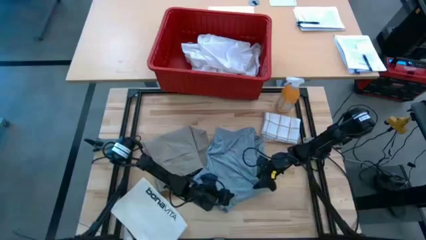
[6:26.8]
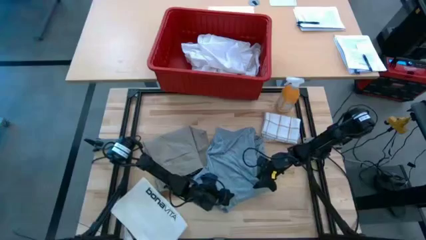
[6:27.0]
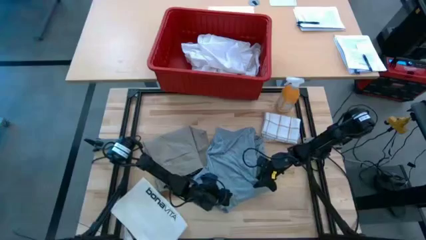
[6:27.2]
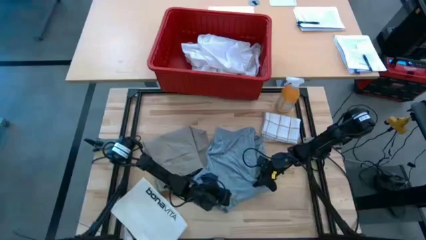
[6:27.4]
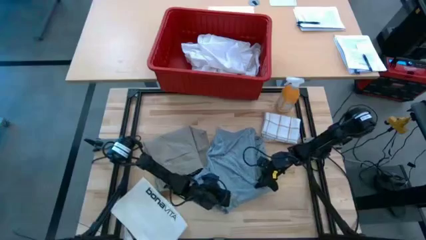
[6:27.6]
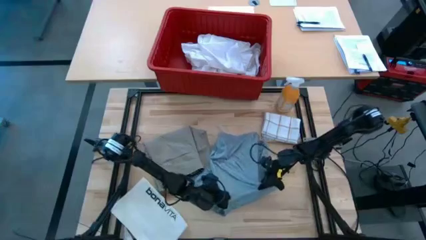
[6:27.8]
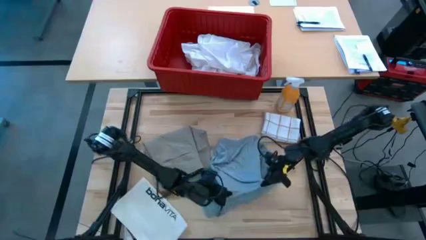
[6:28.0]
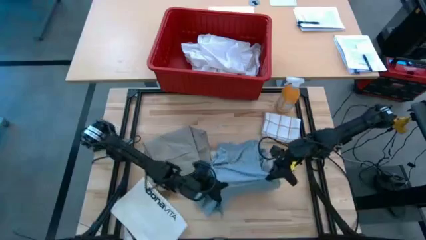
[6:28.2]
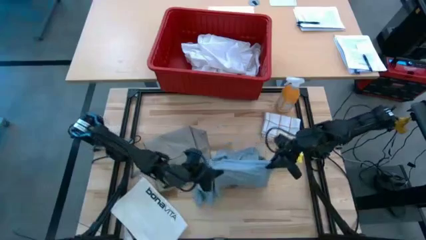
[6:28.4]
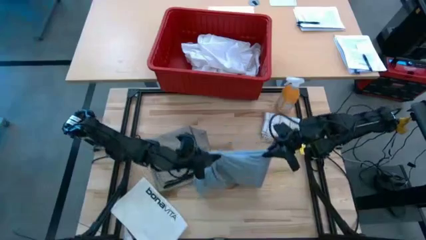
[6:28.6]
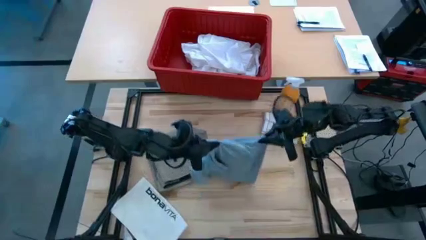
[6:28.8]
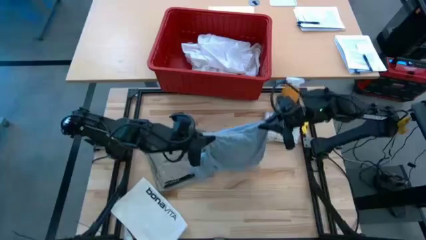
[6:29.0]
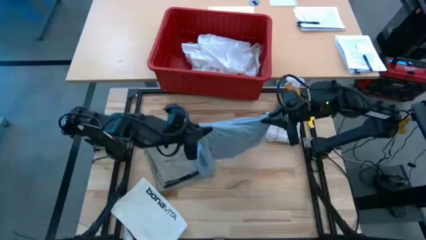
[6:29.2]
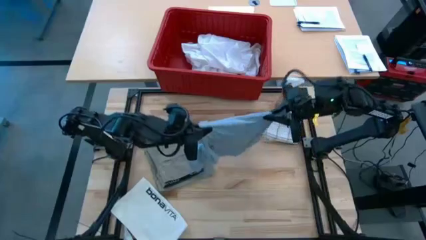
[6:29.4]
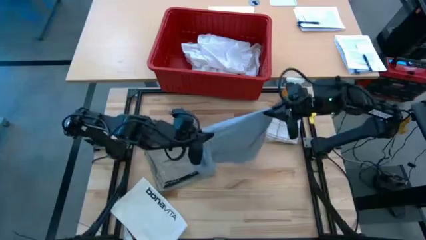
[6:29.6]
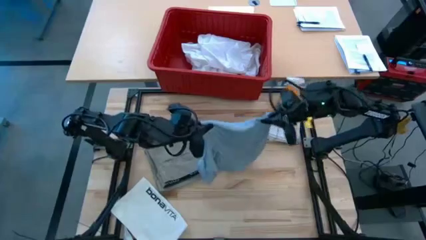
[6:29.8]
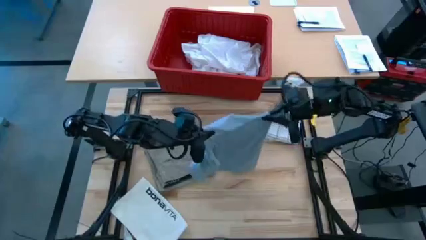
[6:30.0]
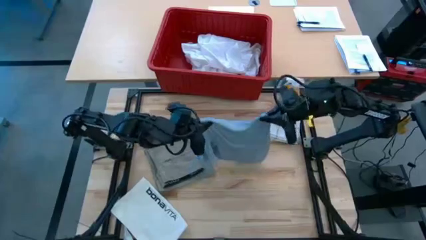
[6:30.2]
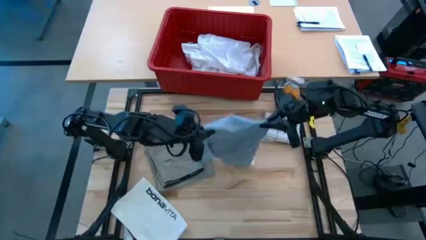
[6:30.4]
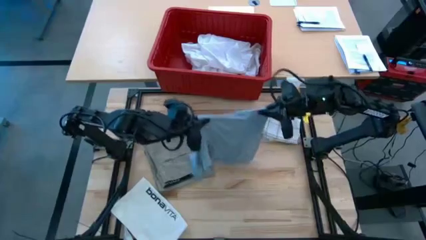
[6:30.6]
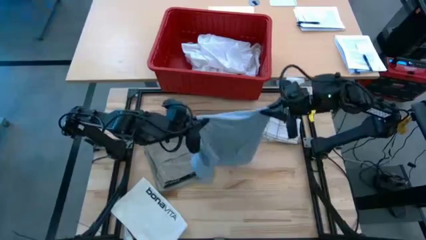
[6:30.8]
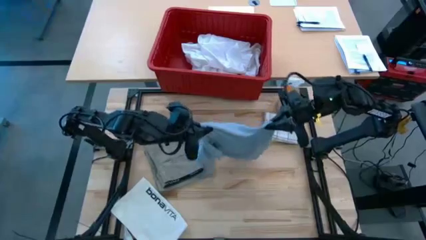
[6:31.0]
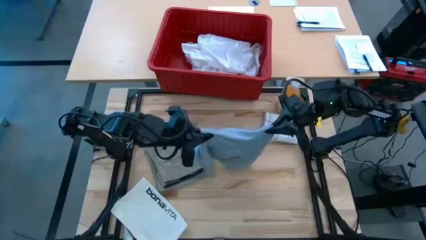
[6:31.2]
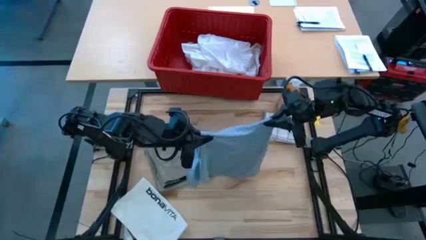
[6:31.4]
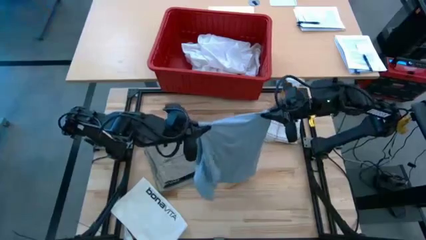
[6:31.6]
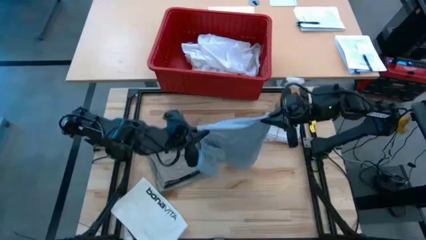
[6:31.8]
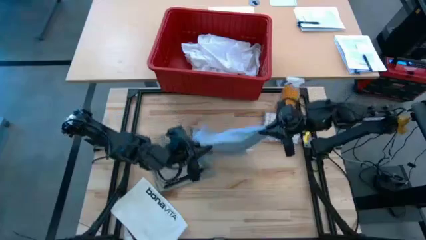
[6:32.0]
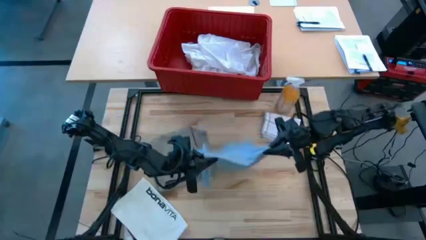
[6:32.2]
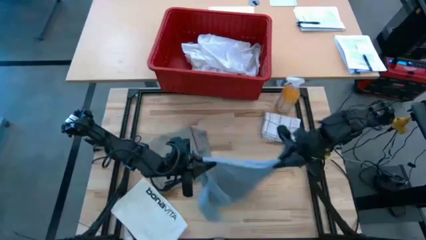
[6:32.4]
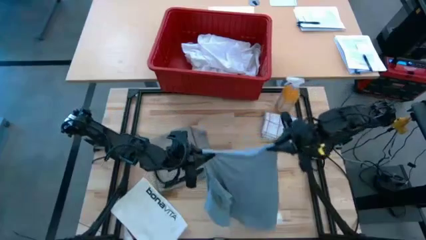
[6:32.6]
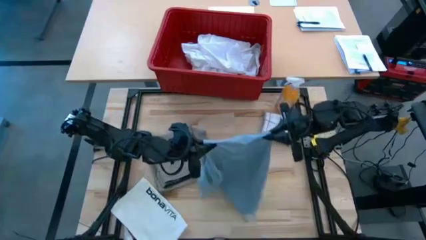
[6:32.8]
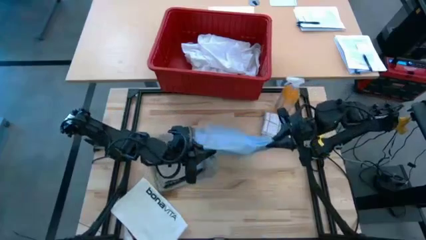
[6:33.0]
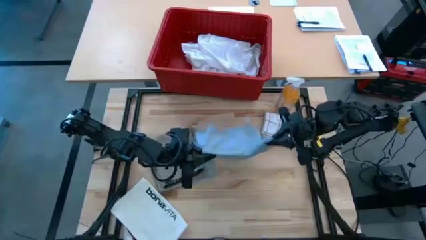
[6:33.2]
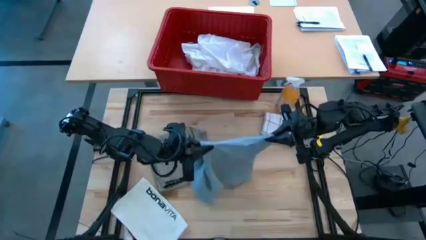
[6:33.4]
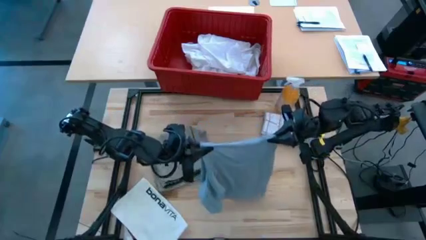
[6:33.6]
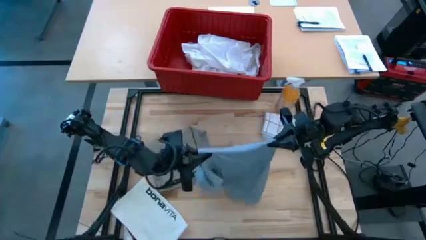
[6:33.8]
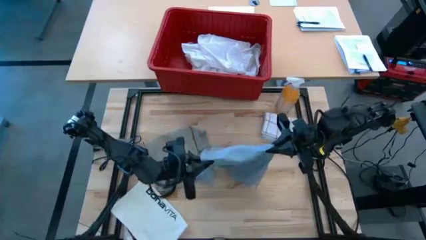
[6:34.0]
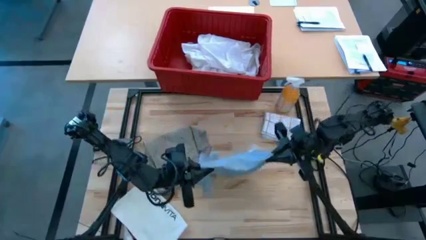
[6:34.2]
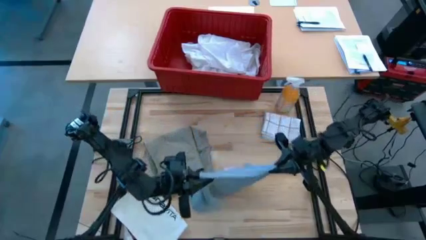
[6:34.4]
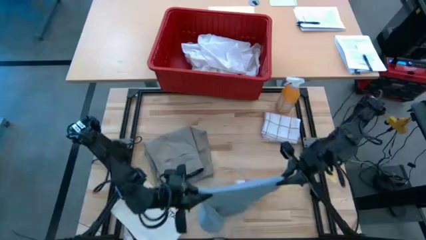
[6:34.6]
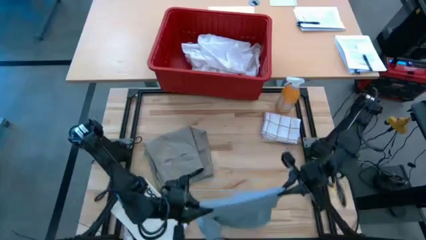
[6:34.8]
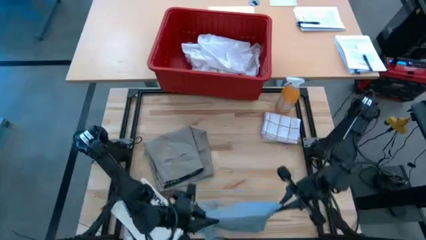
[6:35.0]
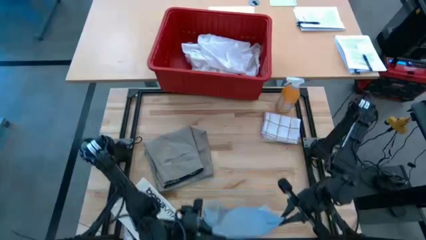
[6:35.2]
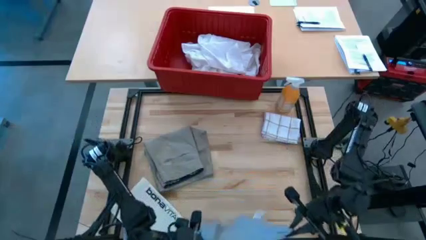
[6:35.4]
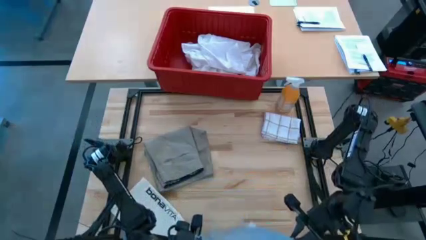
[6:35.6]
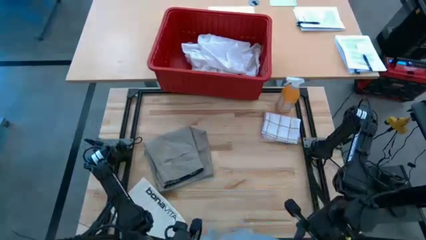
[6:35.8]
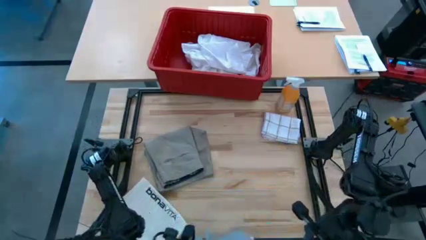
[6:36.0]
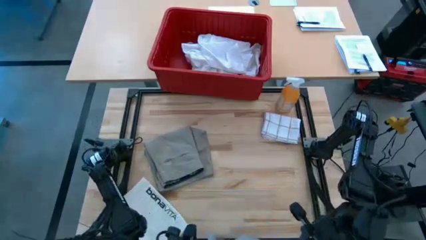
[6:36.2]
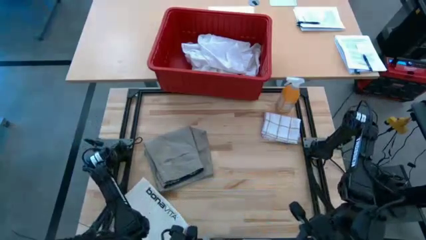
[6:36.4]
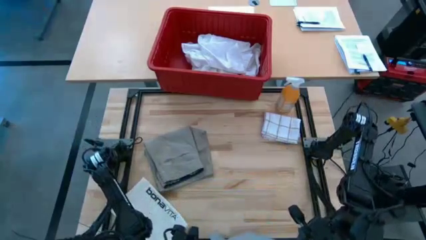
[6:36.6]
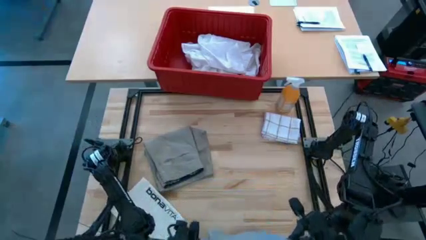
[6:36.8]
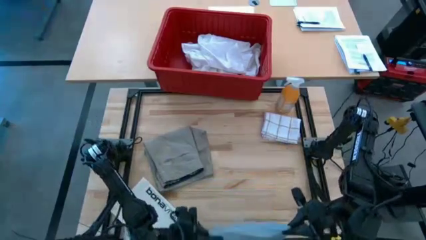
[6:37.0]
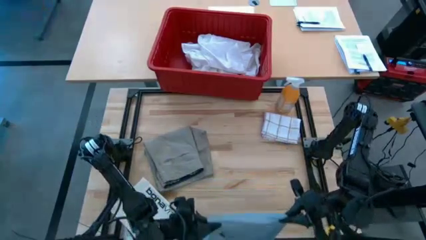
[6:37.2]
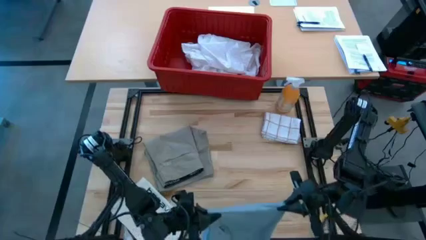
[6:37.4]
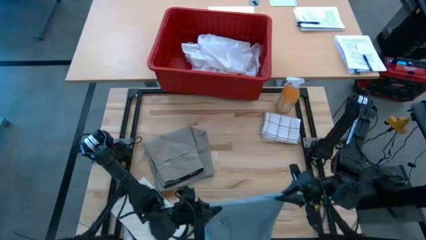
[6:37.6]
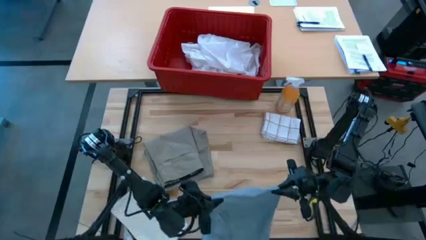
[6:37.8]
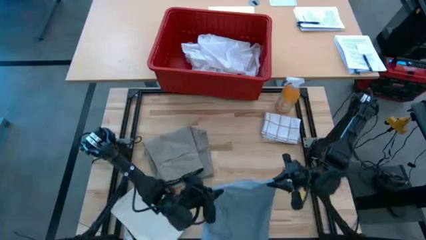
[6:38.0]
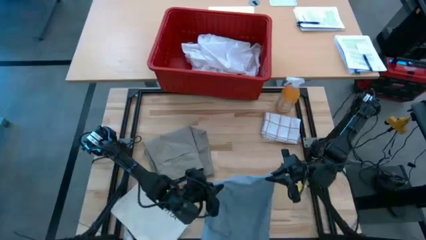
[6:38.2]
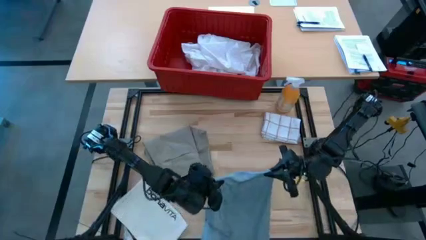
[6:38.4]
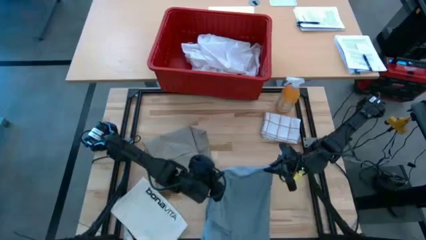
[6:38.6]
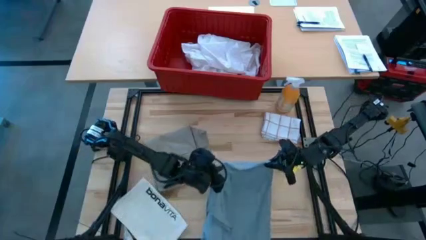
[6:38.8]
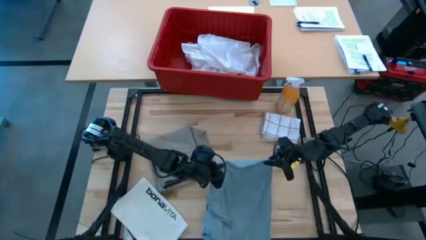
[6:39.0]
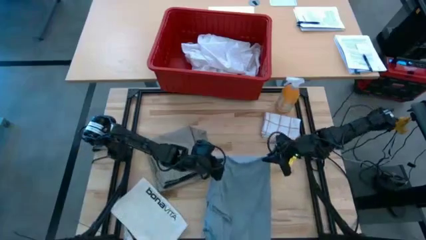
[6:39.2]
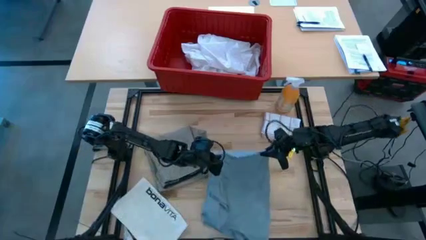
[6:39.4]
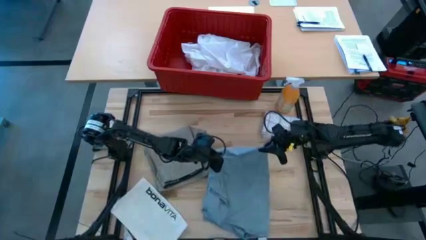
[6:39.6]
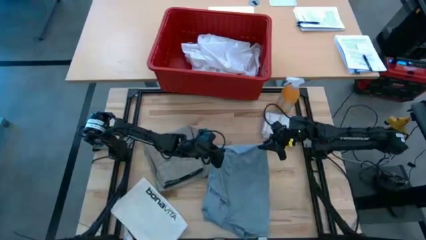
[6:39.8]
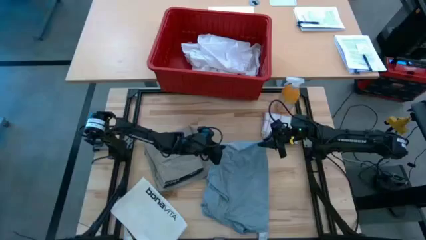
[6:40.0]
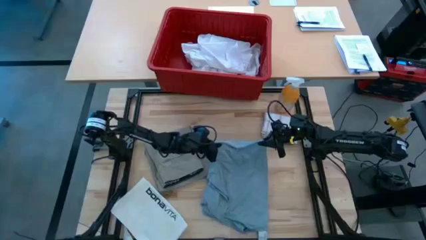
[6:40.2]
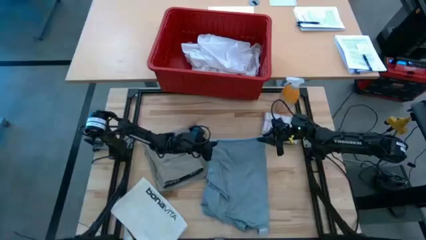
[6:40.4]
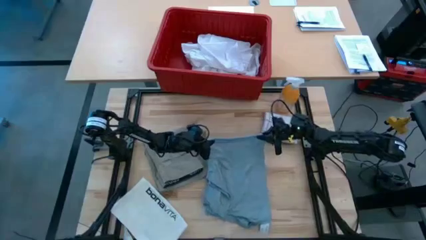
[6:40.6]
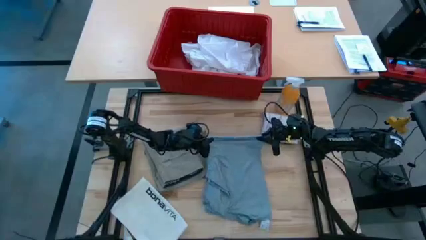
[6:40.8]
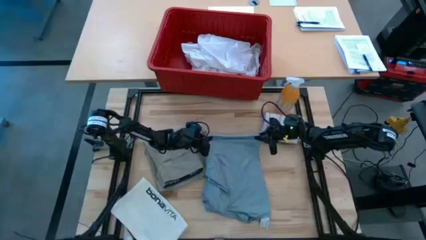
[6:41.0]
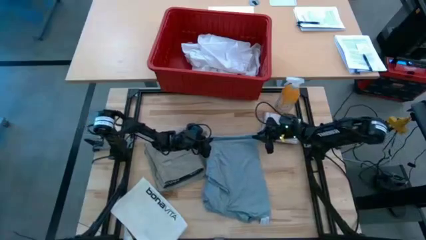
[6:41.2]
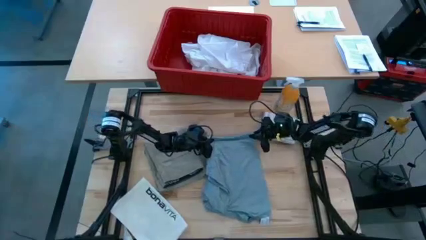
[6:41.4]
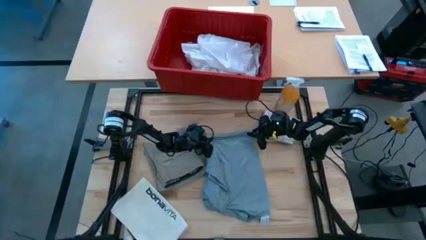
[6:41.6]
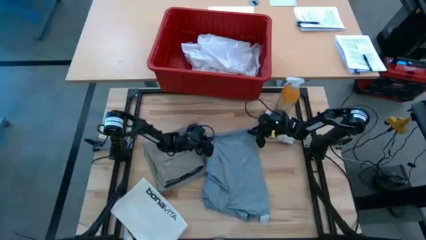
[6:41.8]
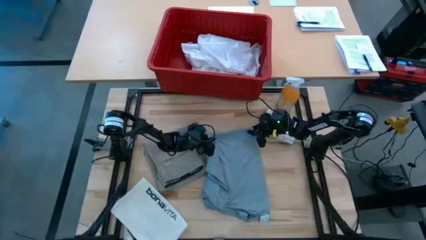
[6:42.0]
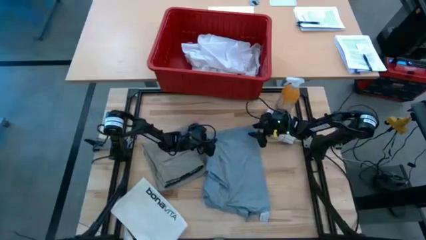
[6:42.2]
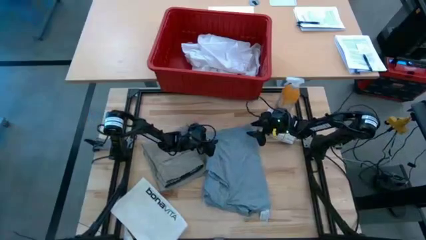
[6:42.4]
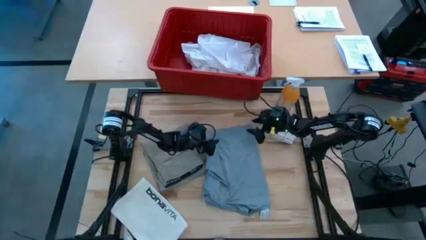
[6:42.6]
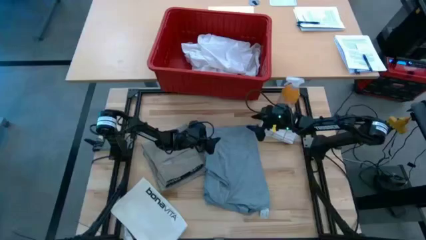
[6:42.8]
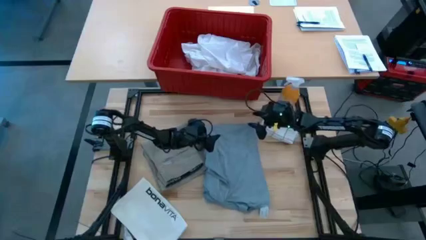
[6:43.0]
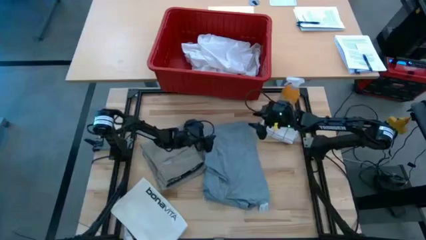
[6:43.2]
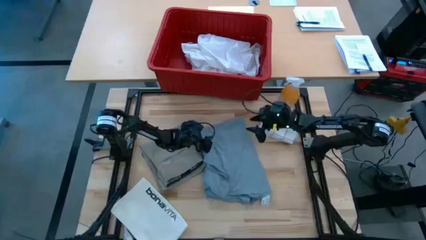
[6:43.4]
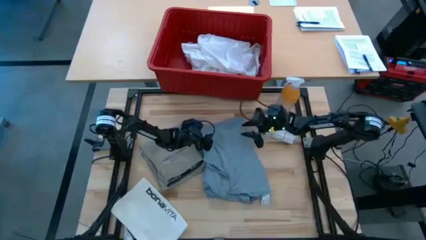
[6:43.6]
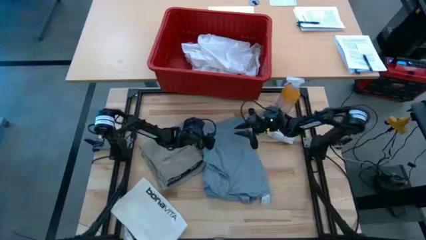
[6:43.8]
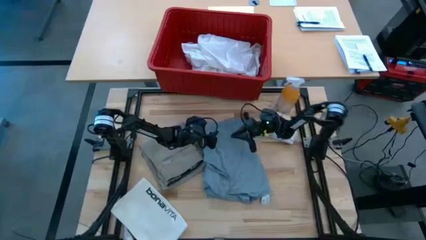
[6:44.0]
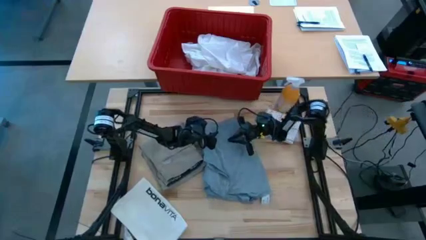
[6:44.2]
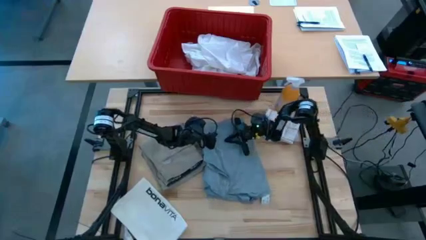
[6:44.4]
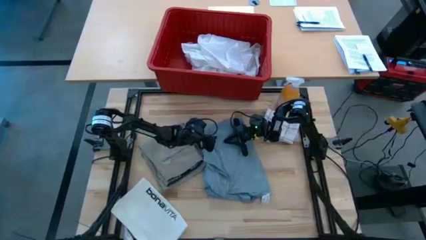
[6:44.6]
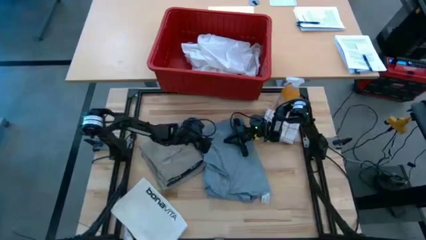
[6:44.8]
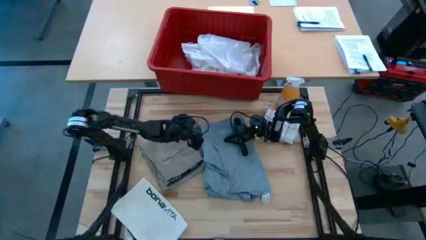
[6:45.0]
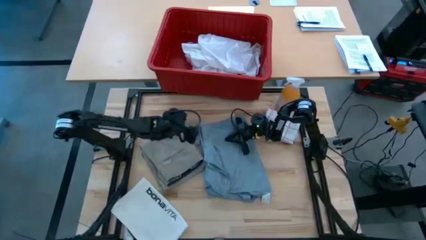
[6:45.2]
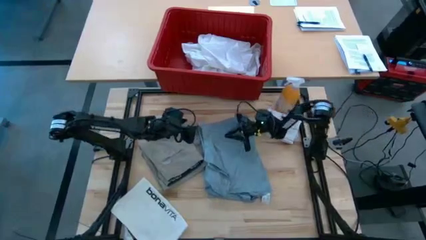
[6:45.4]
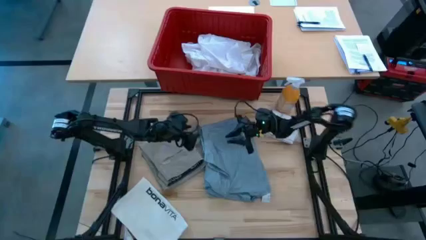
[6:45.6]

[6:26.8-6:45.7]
Task: Fold laundry
Fold the gray shirt
